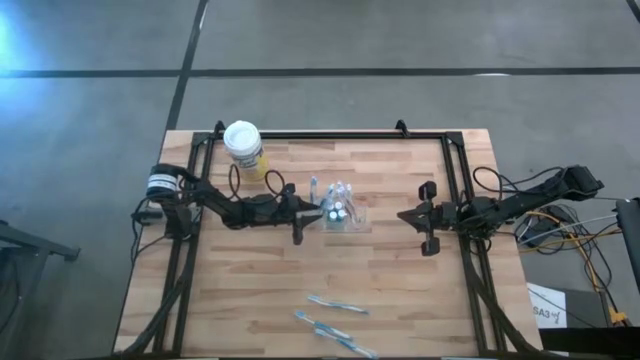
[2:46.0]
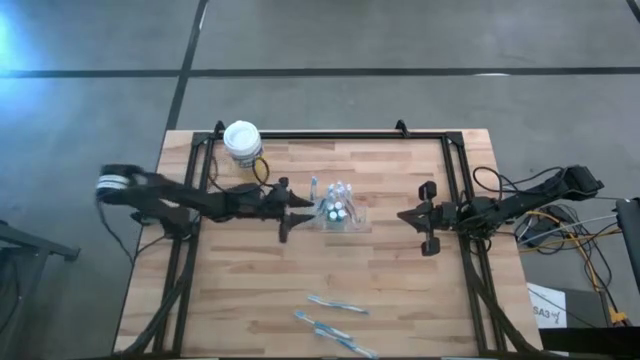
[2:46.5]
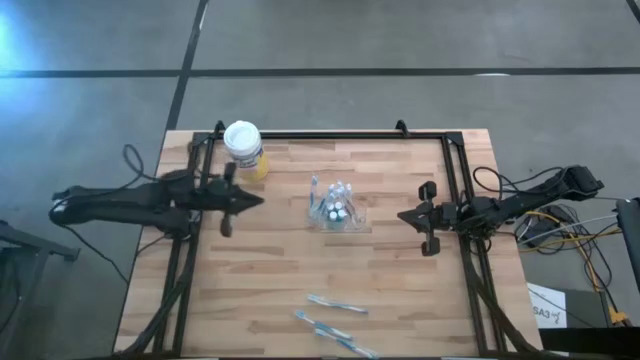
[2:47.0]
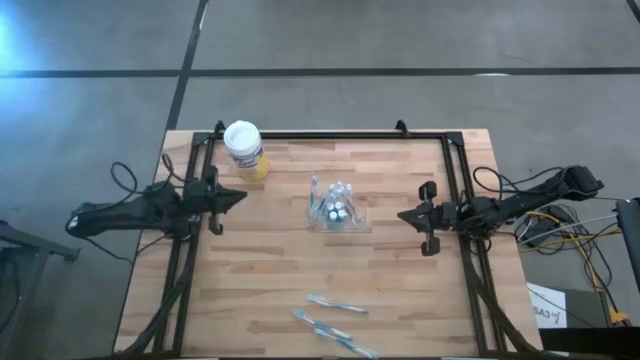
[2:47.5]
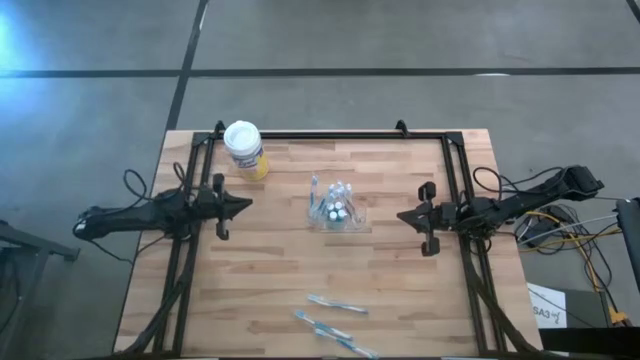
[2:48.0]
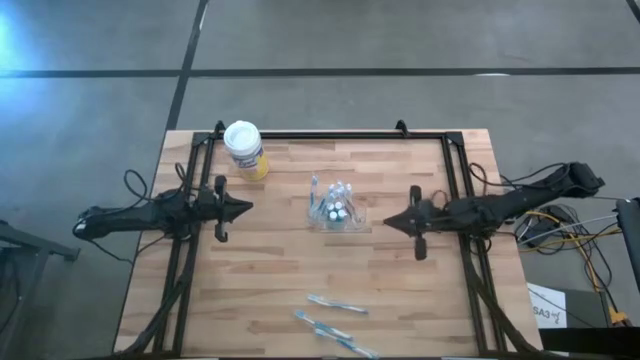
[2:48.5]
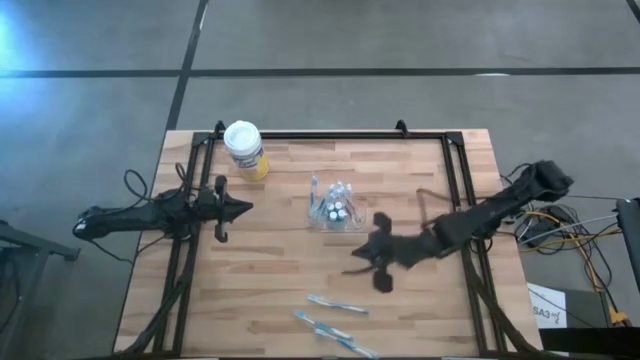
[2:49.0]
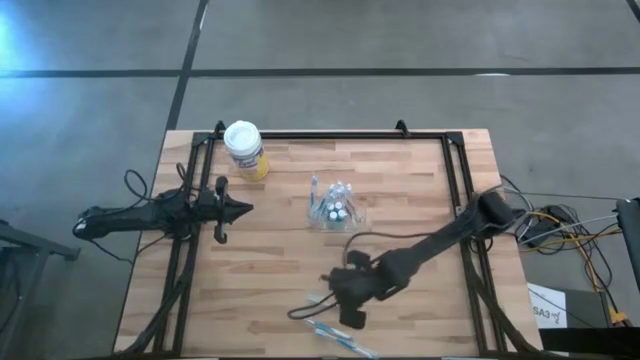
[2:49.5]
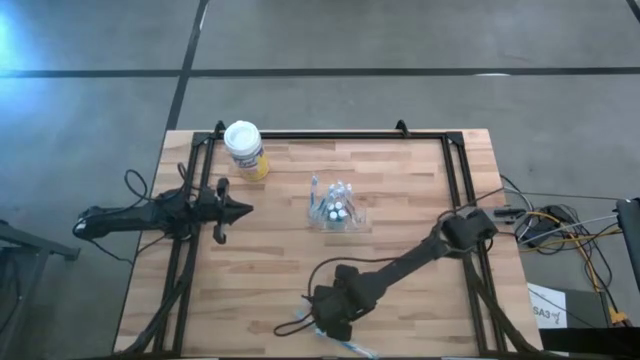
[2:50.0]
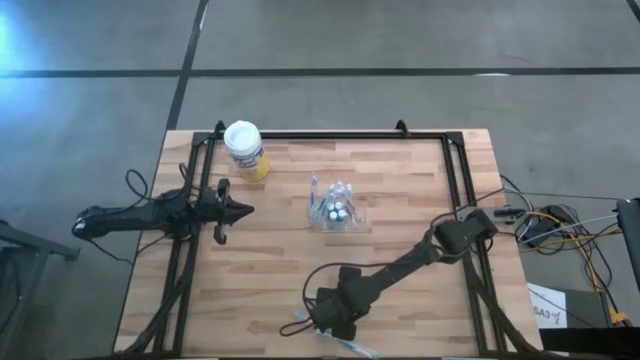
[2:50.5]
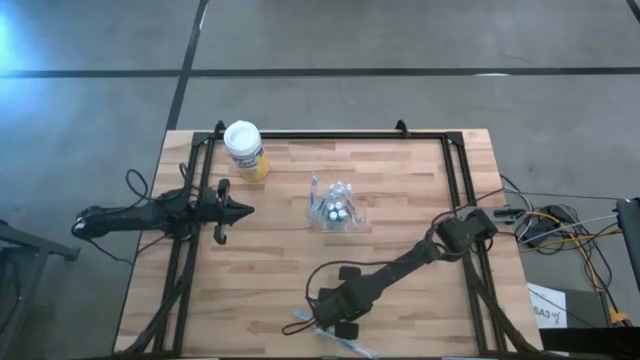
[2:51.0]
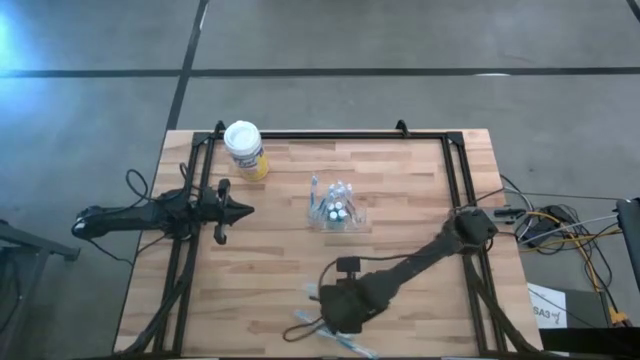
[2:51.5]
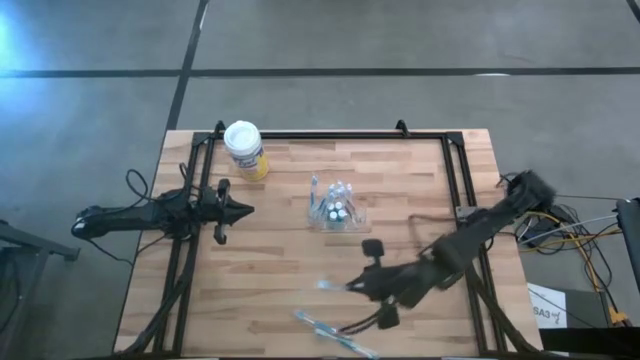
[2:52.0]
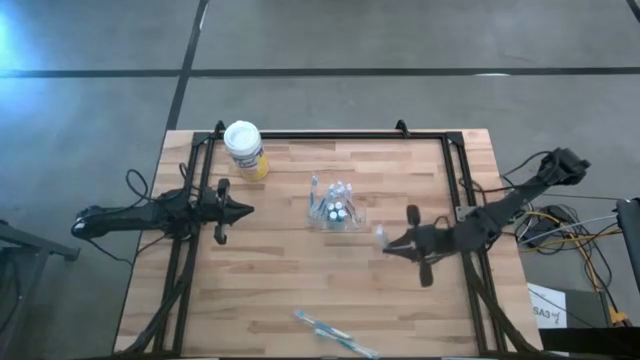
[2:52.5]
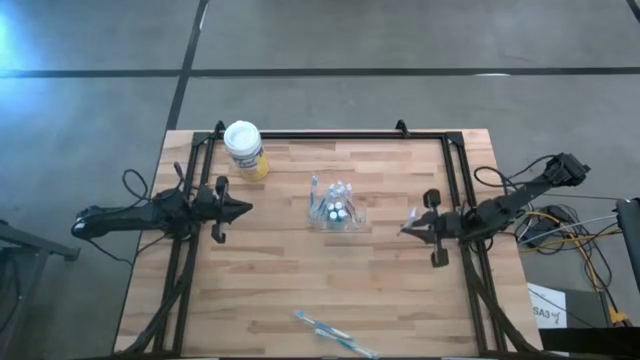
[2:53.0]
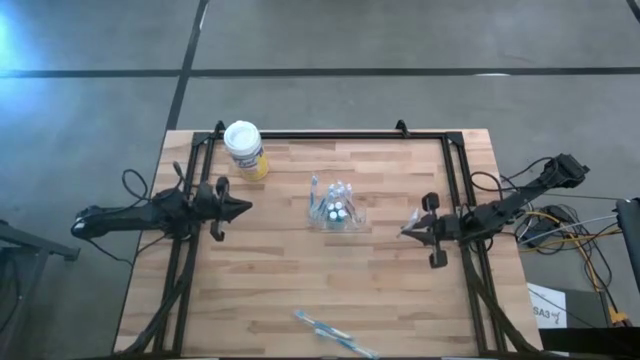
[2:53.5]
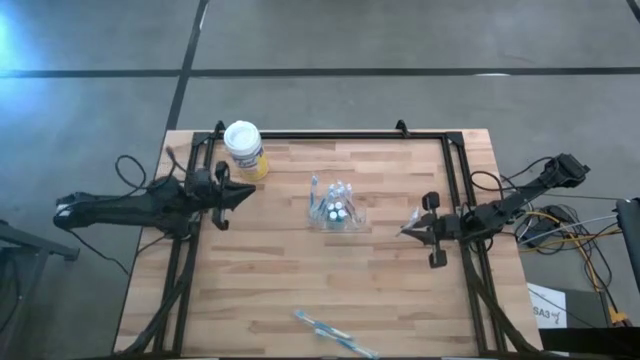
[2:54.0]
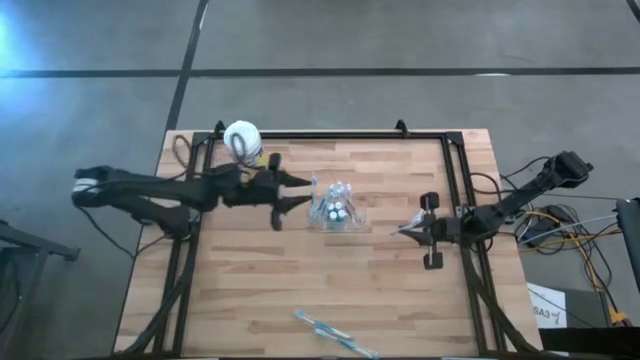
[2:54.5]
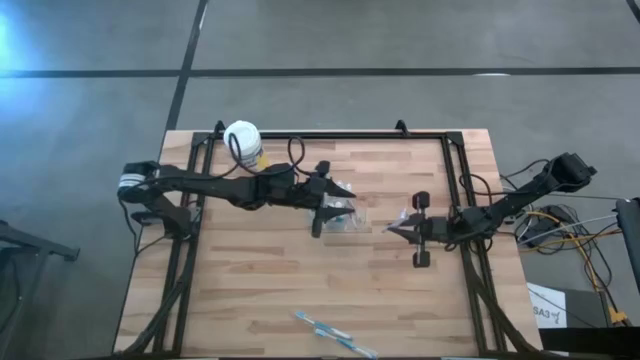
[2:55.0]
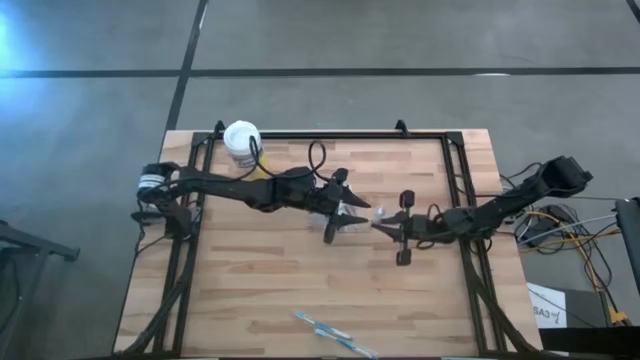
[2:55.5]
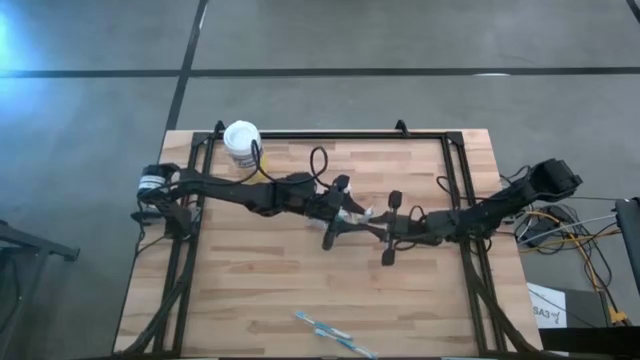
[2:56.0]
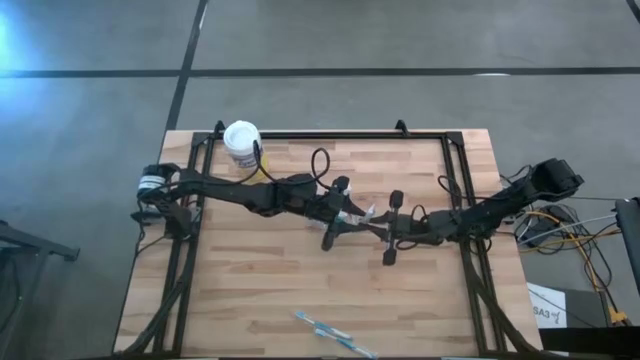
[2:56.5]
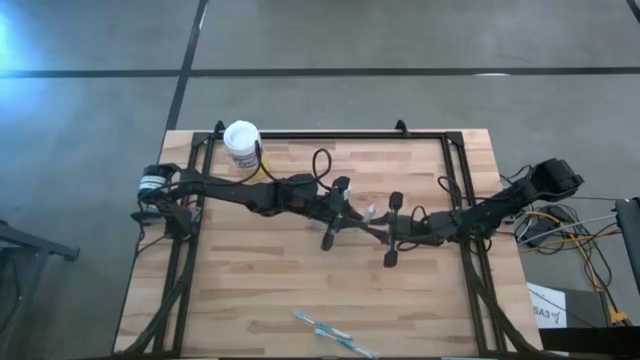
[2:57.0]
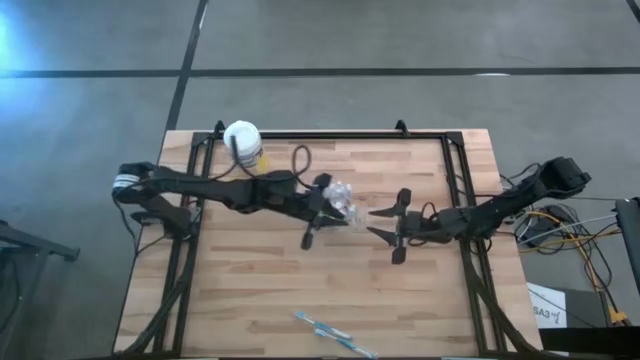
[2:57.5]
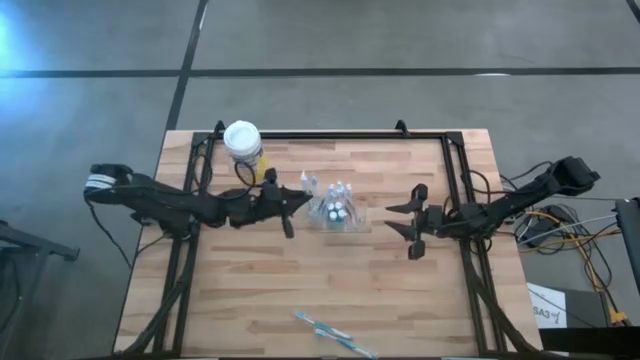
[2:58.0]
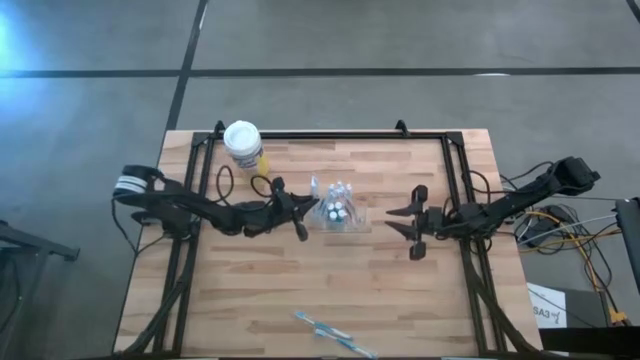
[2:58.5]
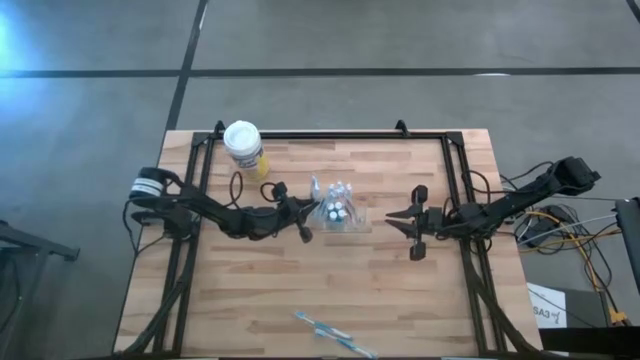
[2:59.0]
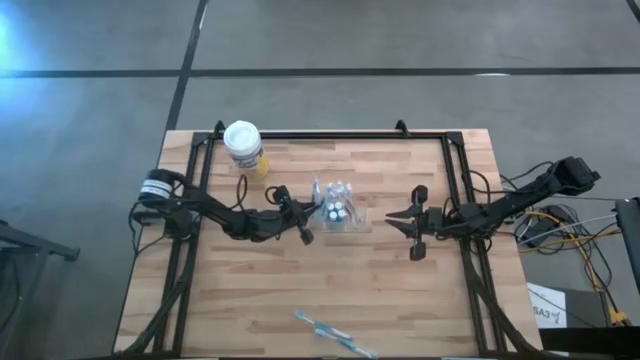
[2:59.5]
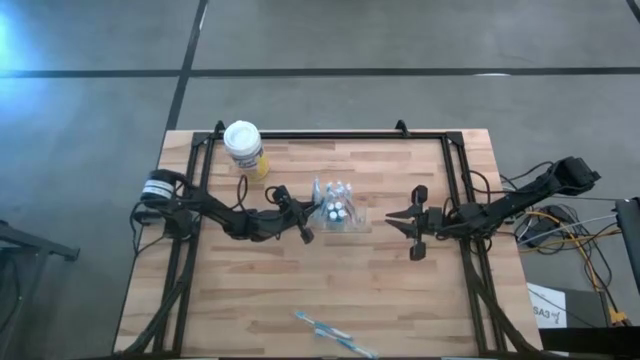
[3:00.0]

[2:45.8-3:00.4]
Task: Pick & Place toothbrushing station
Put the blue toothbrush into the left compartment of the transparent organizer

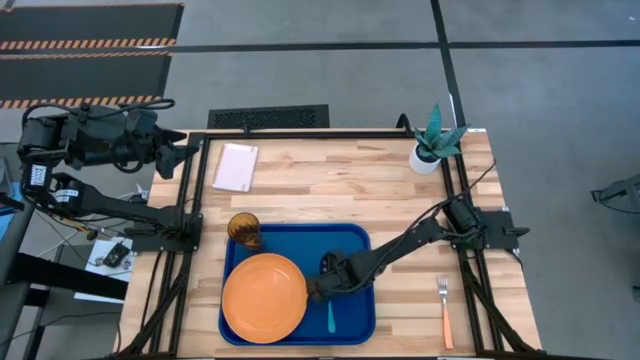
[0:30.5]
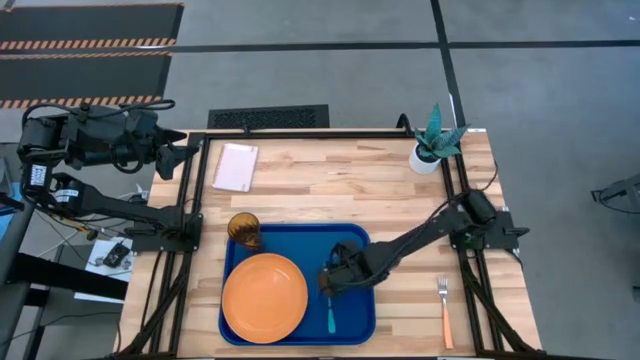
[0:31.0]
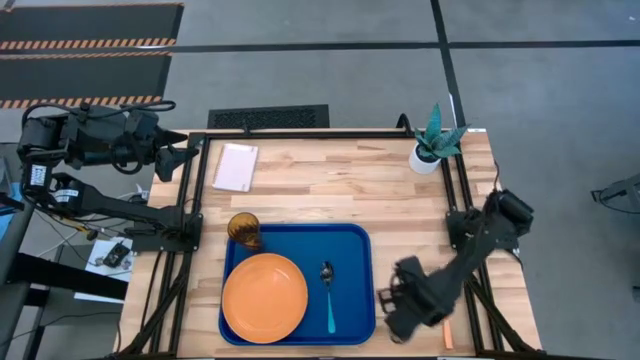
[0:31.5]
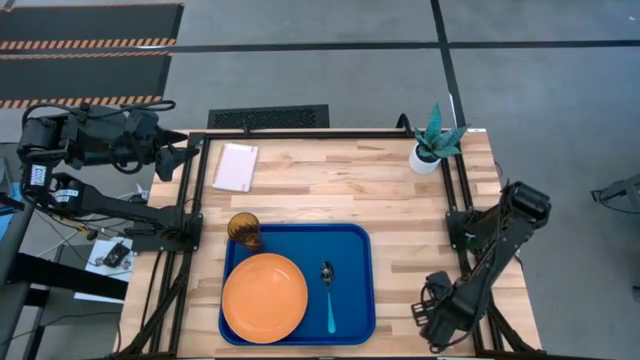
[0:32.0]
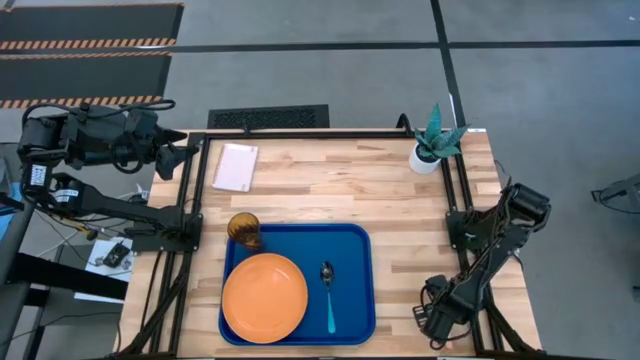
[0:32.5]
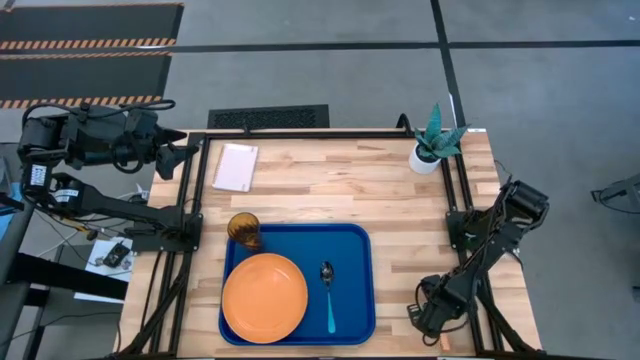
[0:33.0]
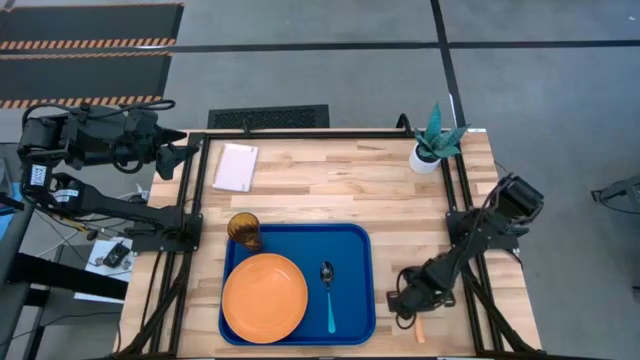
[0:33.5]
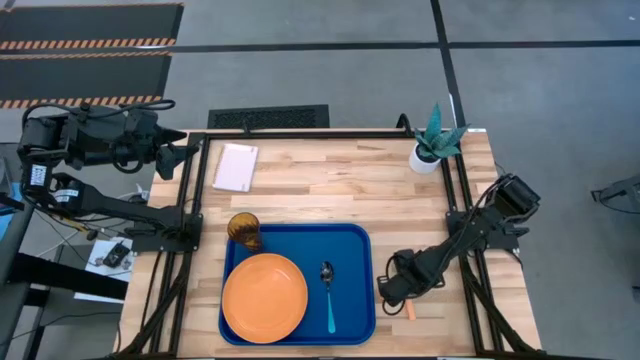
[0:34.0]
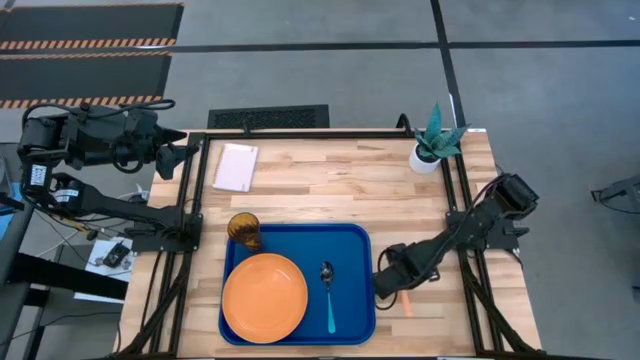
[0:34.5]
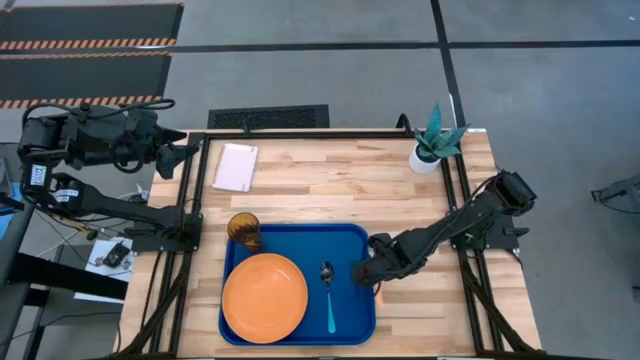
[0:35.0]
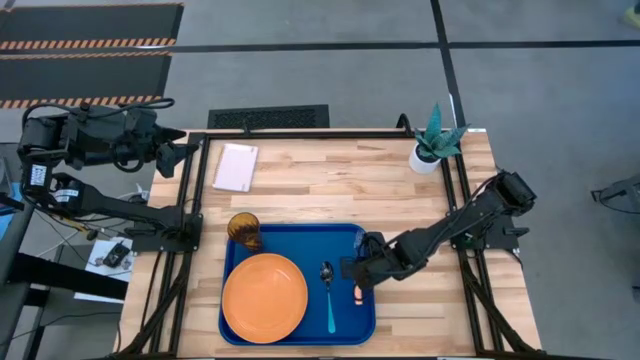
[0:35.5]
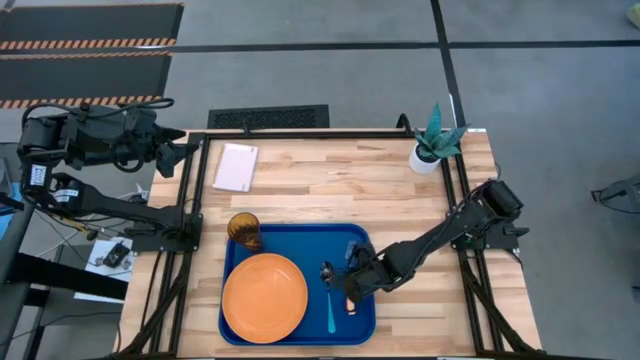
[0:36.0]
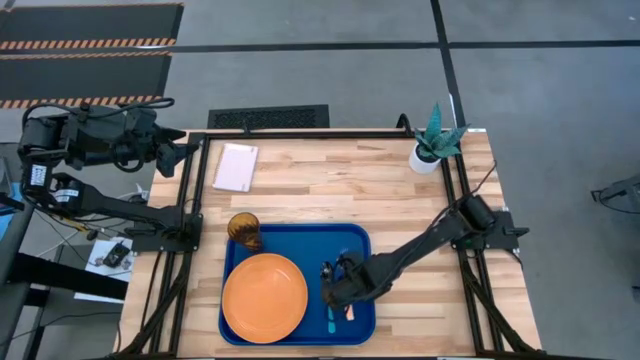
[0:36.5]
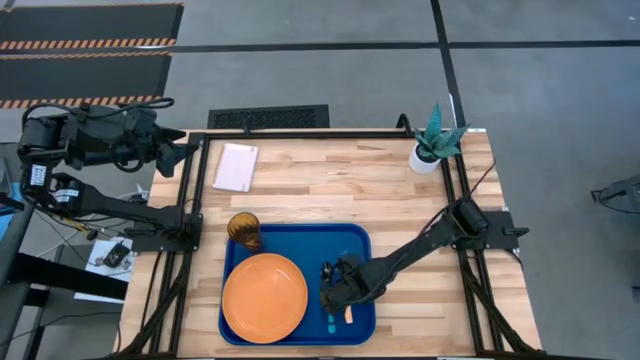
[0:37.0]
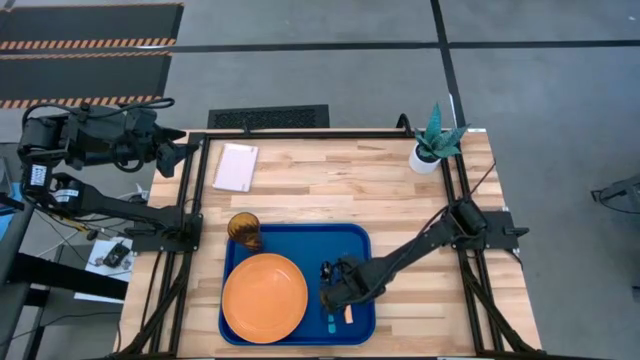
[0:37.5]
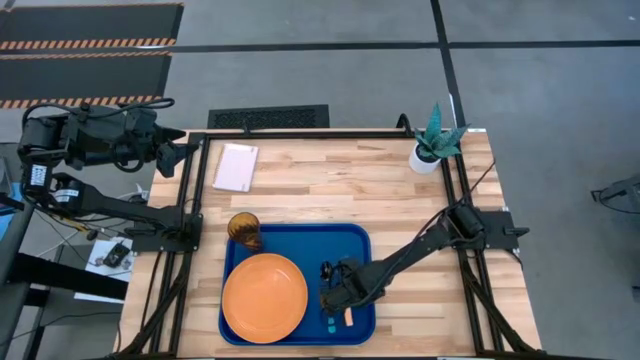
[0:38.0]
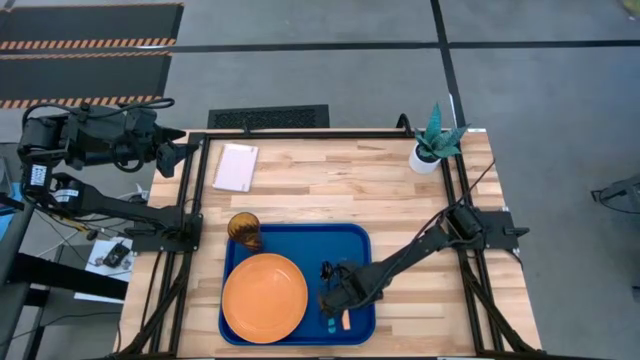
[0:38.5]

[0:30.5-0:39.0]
Task: Pick and place plate/cup/fork/spoon on tray
Put the orange fork on the blue tray to the right of the blue spoon
